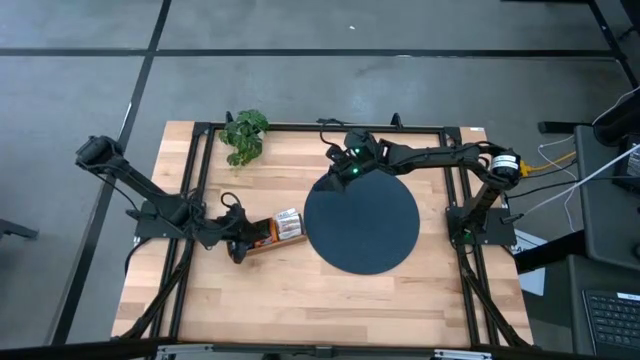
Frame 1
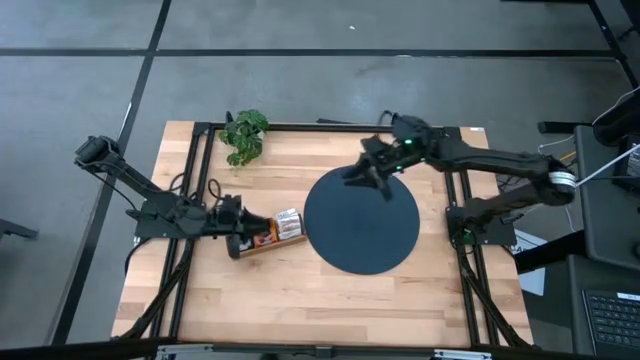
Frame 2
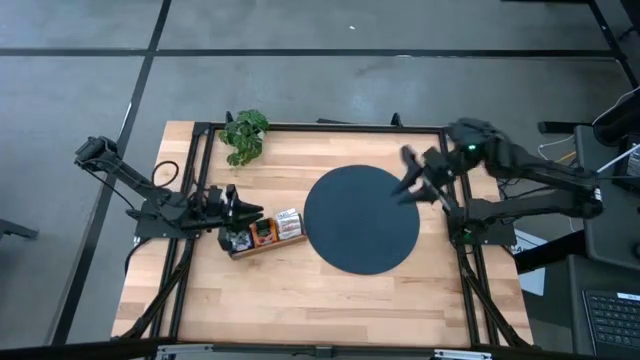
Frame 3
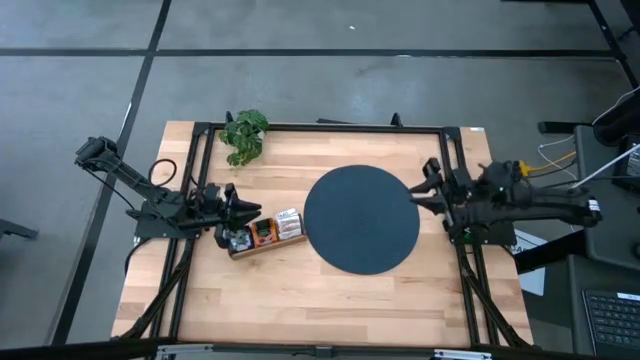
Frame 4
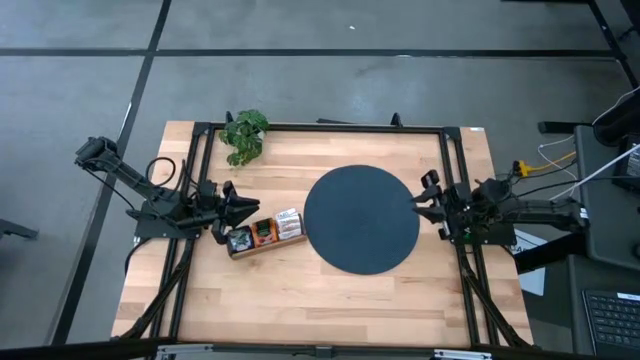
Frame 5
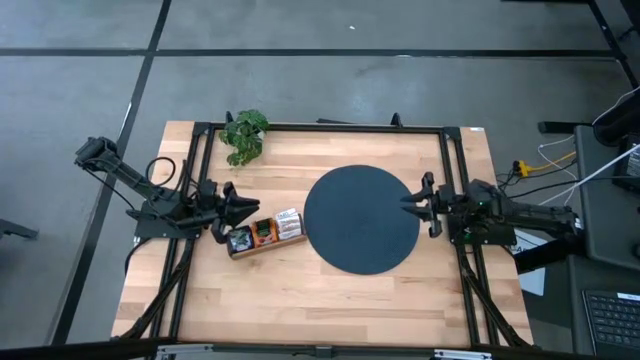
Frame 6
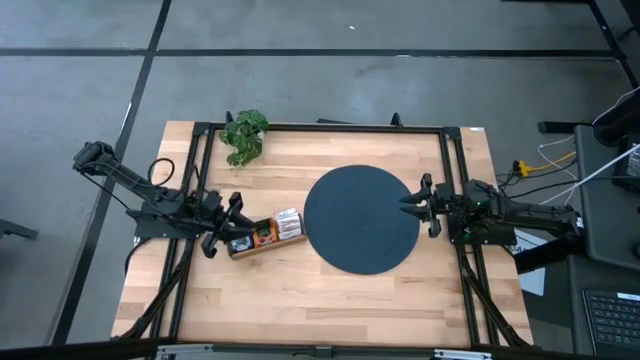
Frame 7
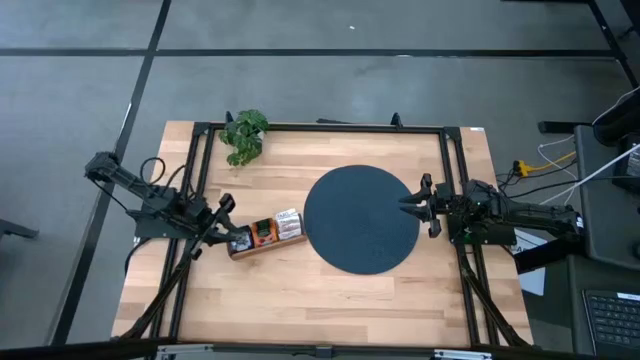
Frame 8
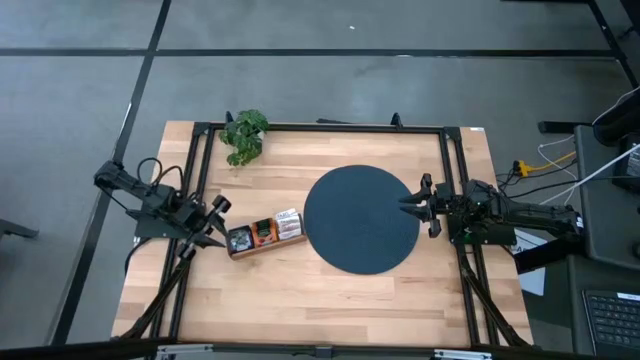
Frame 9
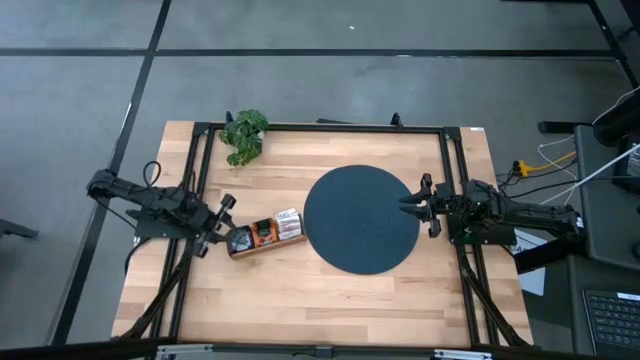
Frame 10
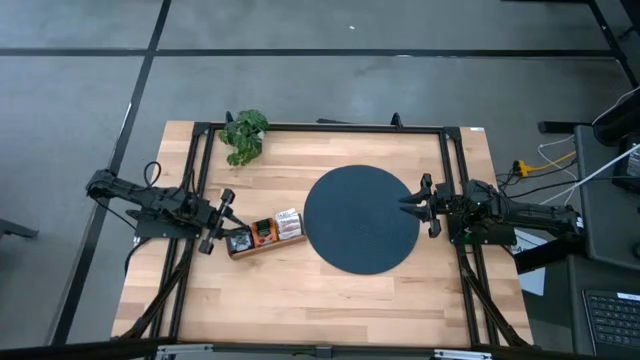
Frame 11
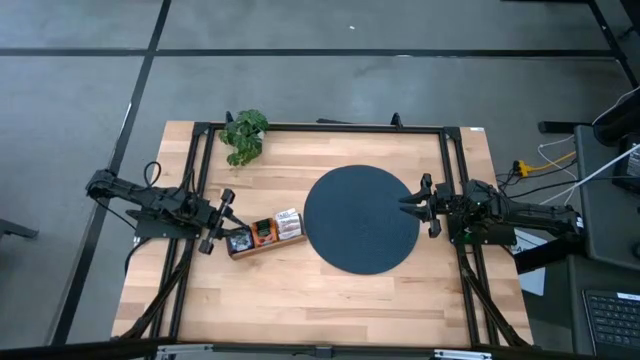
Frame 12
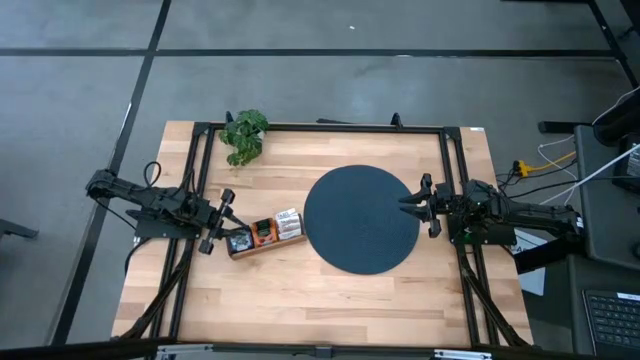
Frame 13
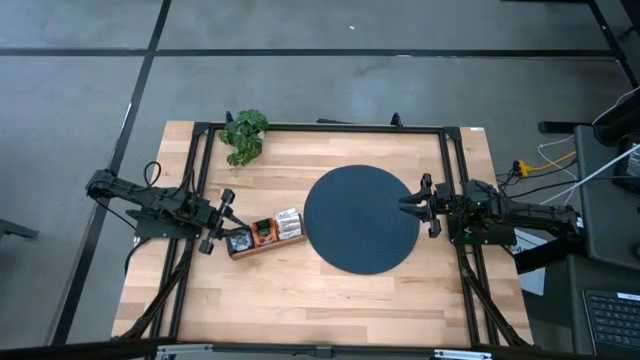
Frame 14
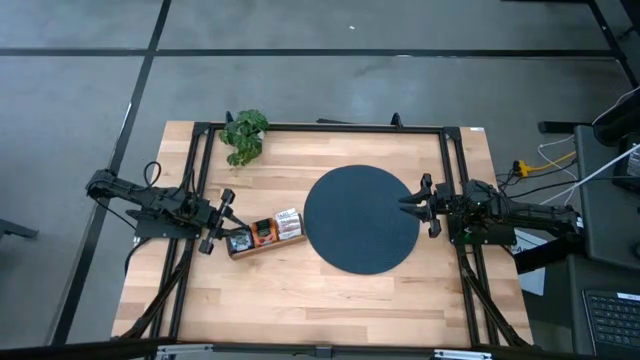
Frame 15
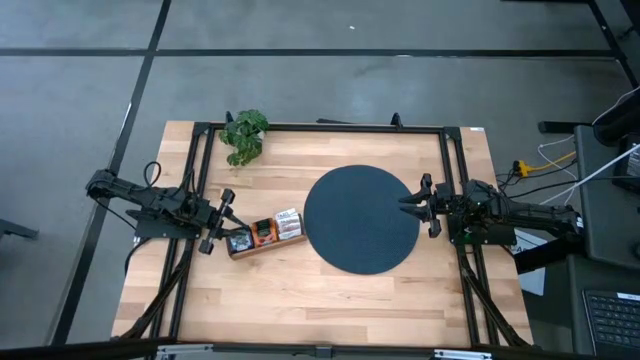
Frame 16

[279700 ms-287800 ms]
Task: Pick & Place Tea
Return to Home Position

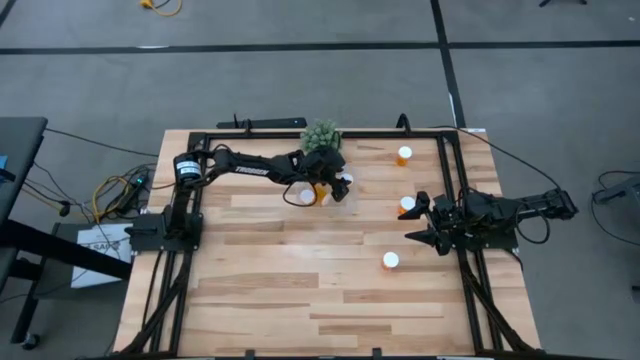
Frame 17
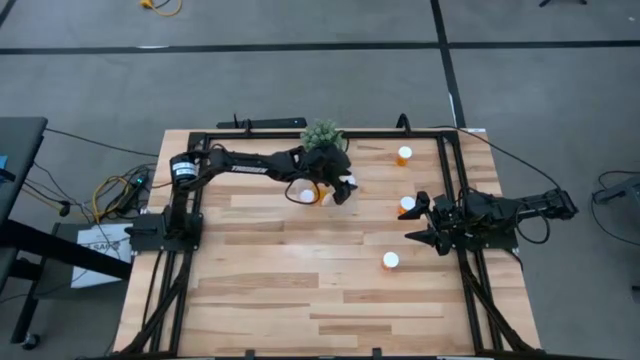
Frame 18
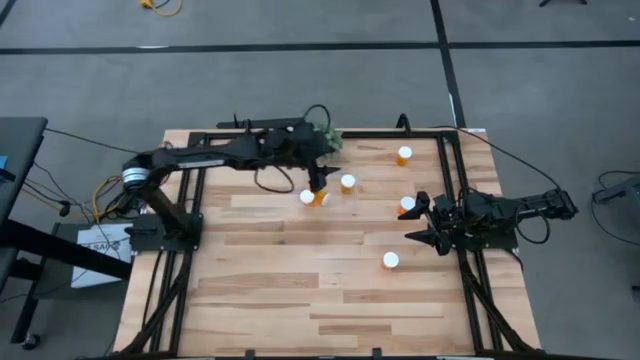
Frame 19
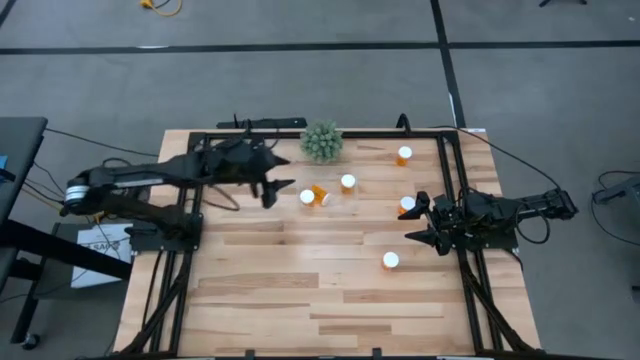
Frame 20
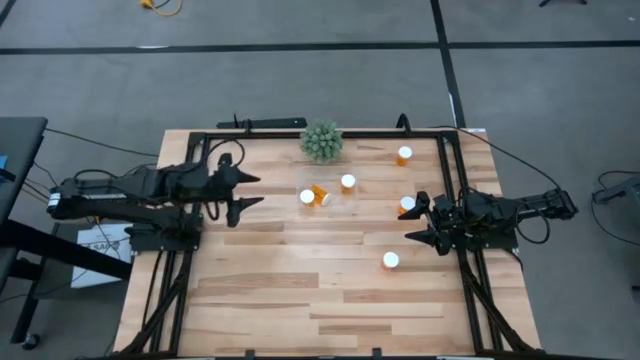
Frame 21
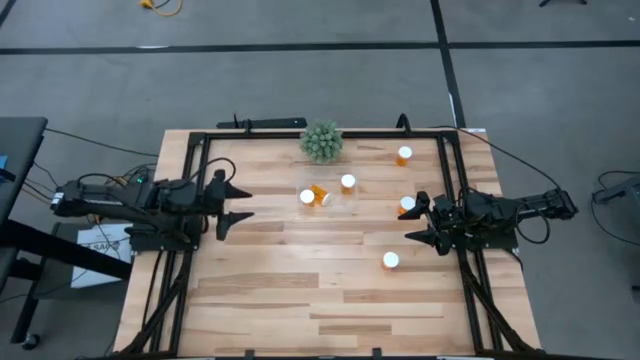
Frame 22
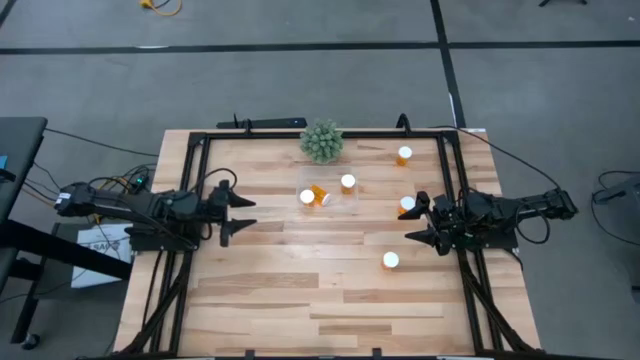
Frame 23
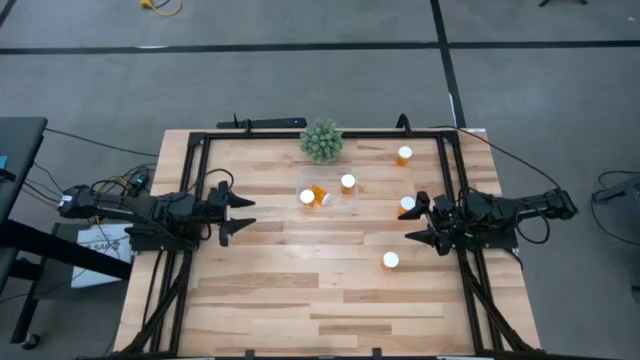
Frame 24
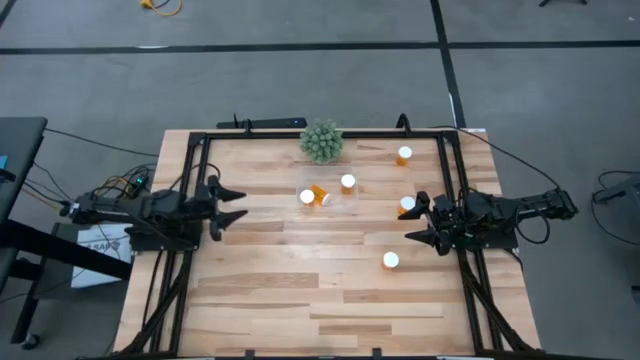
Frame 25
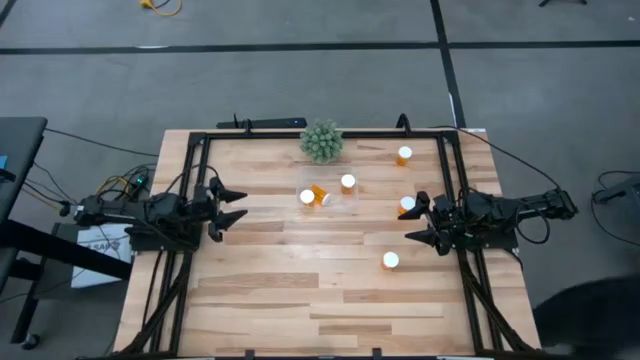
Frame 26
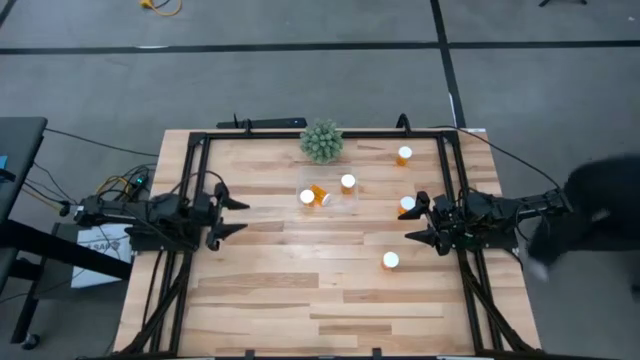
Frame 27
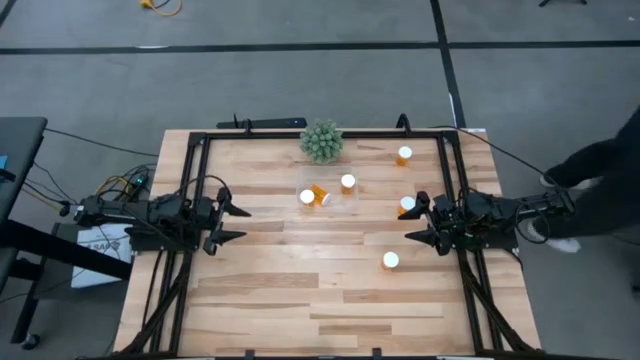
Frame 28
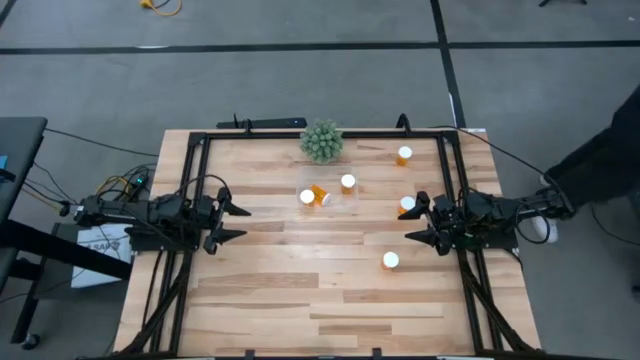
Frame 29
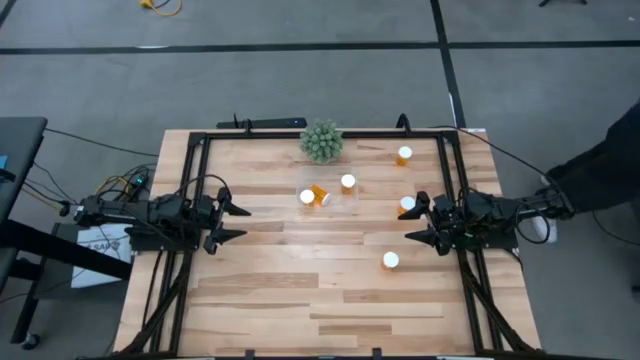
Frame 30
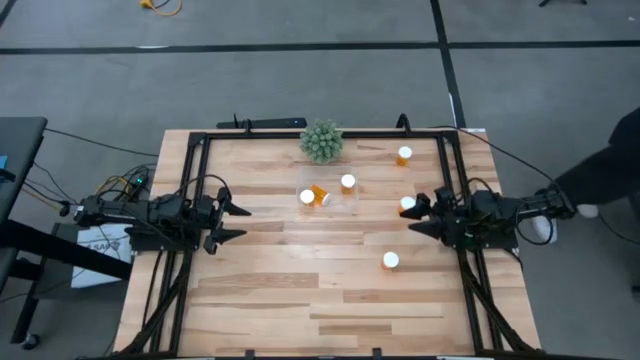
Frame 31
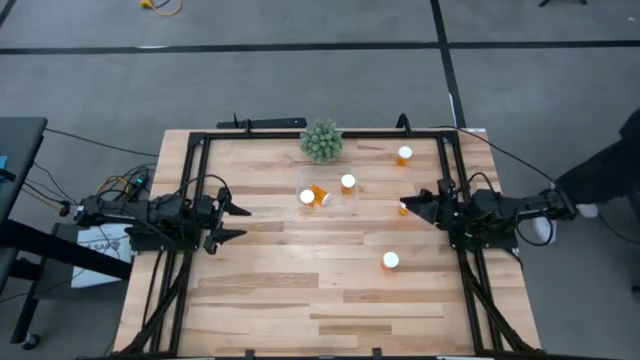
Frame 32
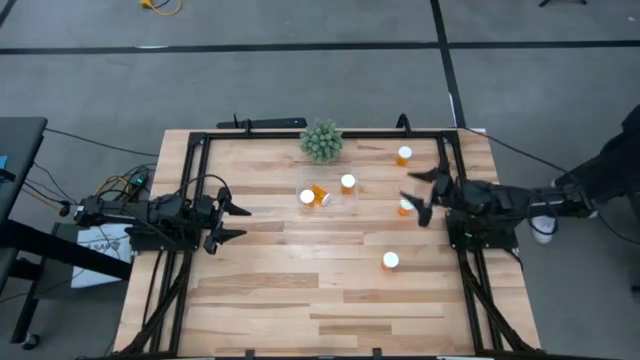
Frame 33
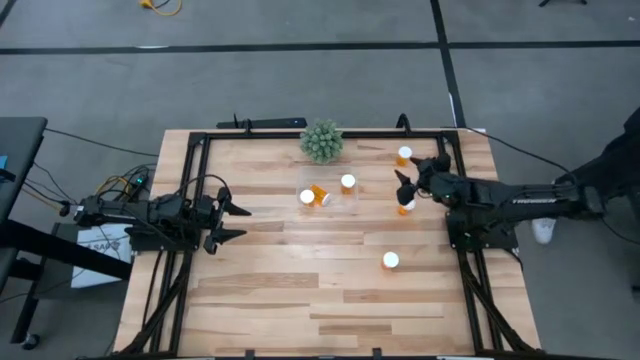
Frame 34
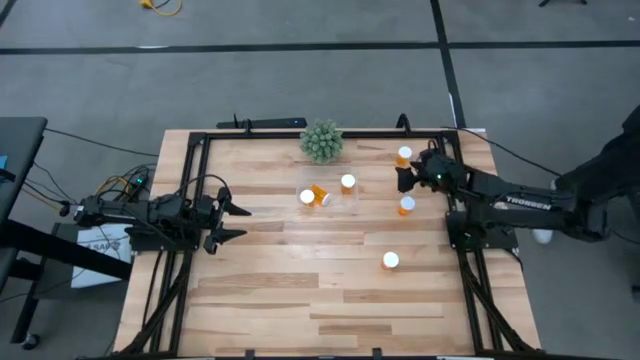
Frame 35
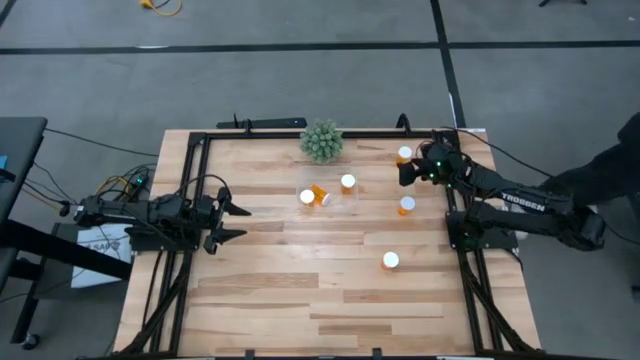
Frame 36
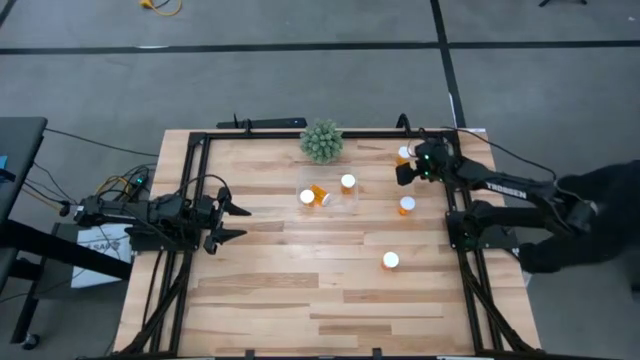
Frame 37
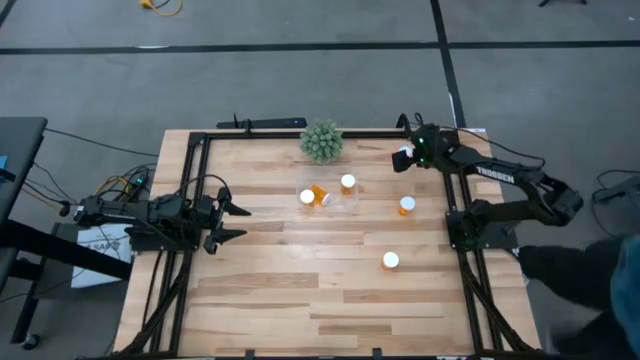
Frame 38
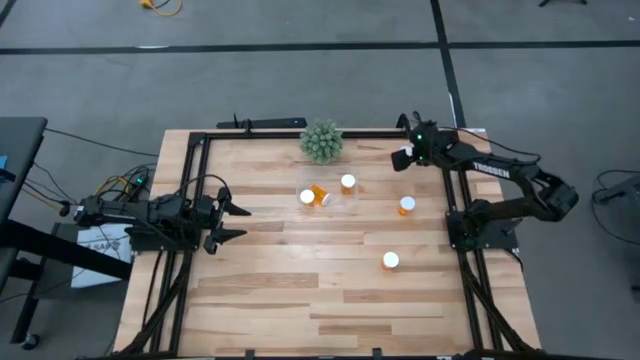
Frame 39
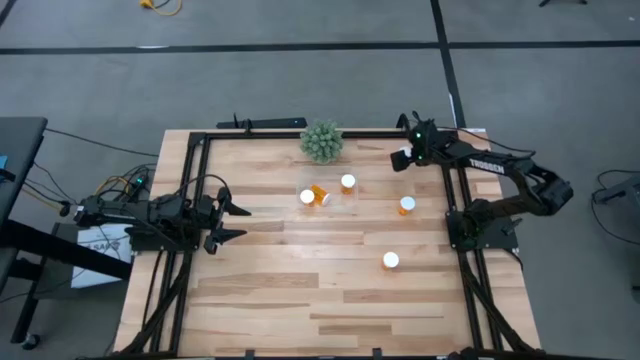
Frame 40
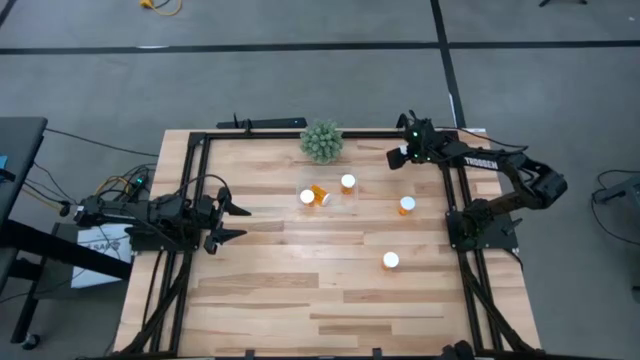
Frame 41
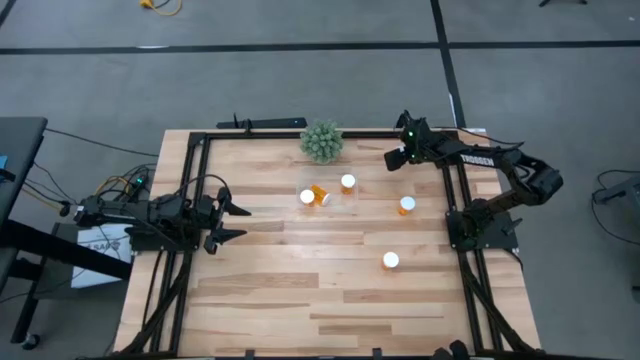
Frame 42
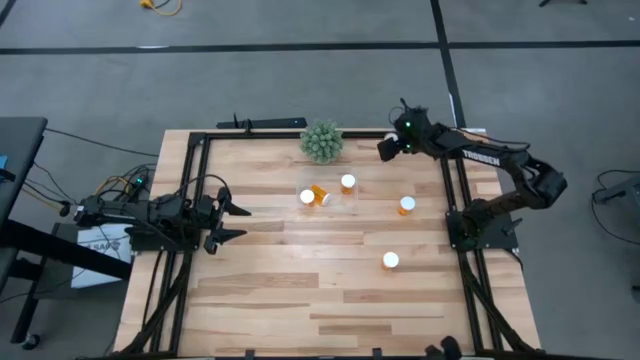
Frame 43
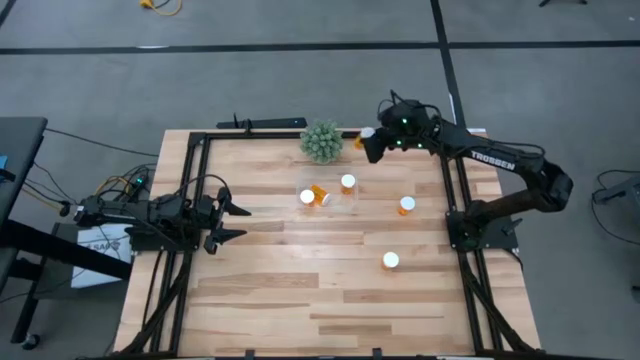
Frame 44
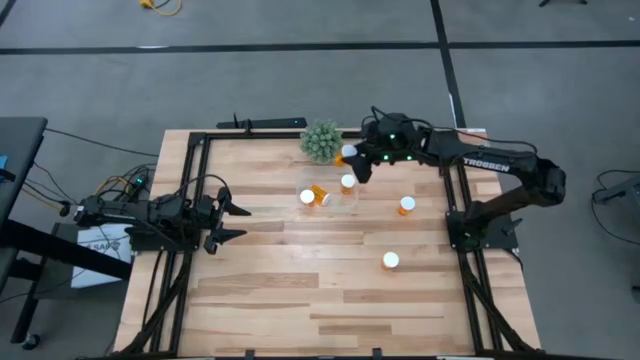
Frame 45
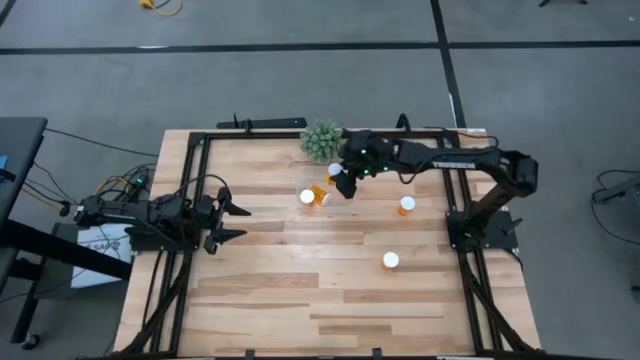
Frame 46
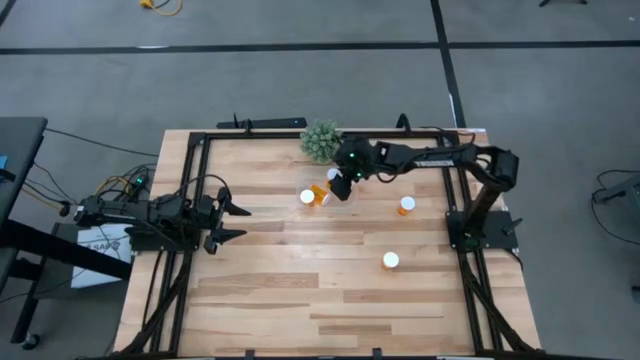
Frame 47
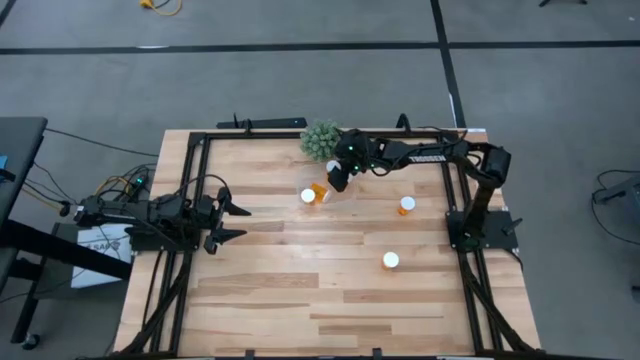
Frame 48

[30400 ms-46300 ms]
Task: Pick and place pill bottles into a basket
Put the orange pill bottle into the transparent bin
